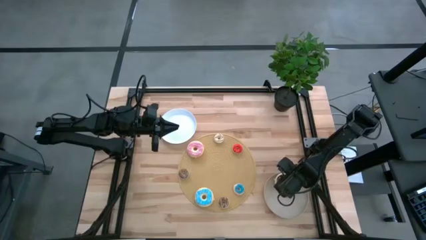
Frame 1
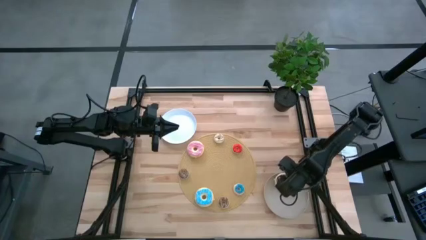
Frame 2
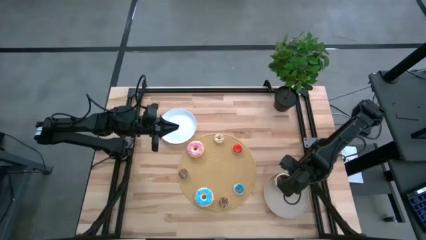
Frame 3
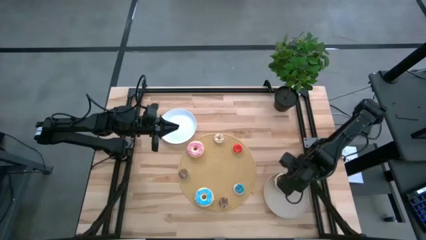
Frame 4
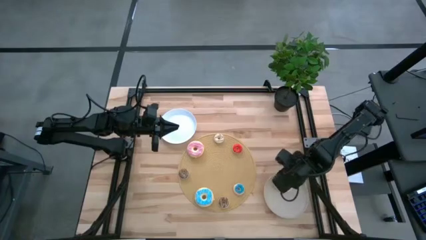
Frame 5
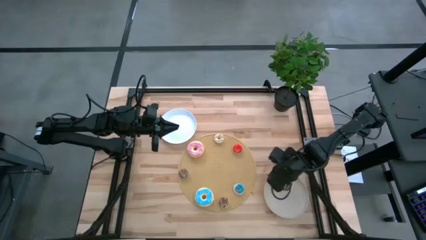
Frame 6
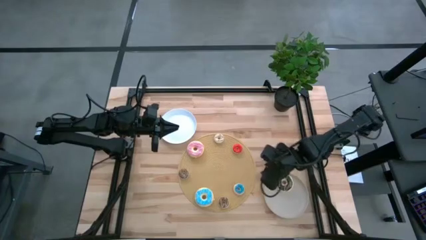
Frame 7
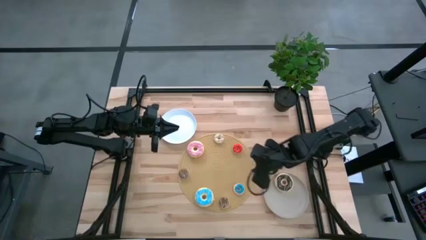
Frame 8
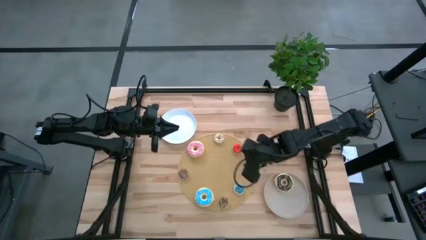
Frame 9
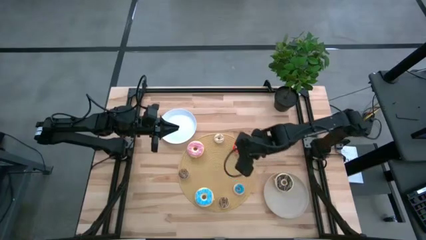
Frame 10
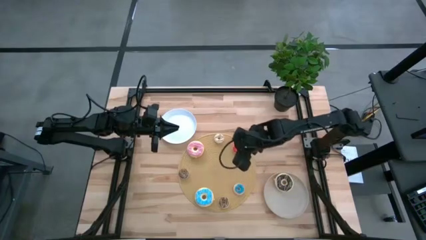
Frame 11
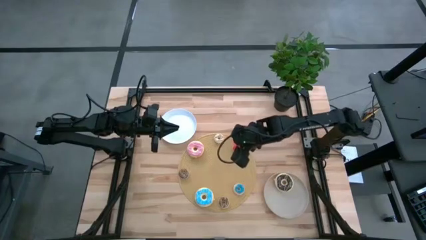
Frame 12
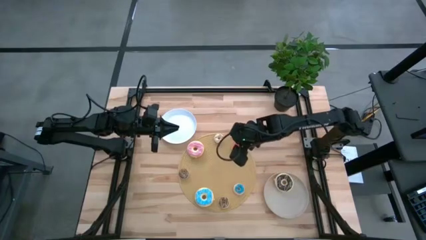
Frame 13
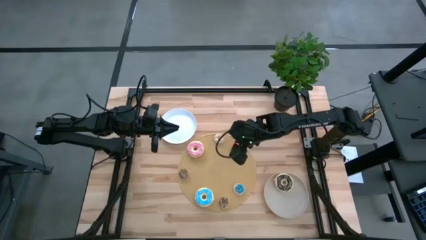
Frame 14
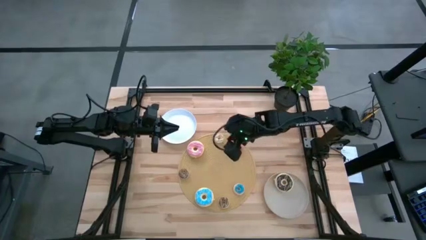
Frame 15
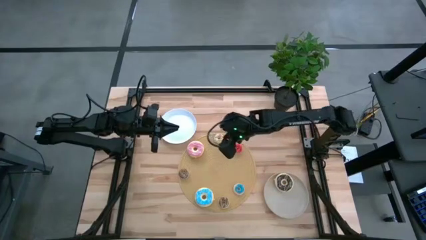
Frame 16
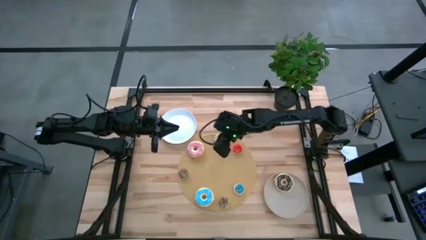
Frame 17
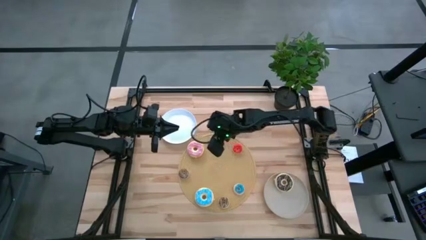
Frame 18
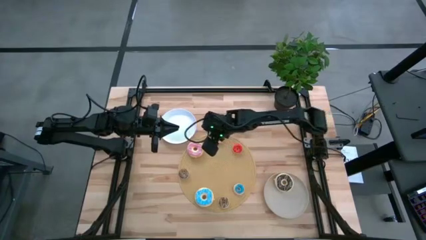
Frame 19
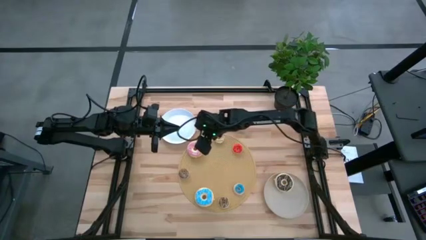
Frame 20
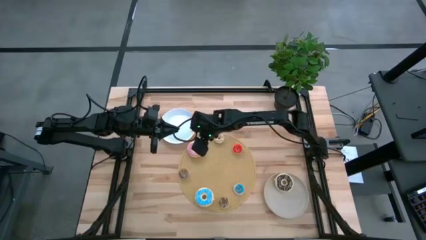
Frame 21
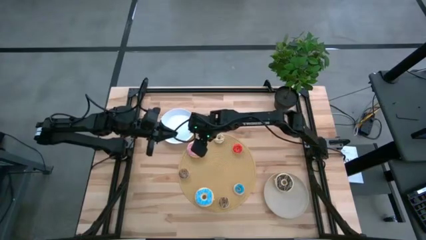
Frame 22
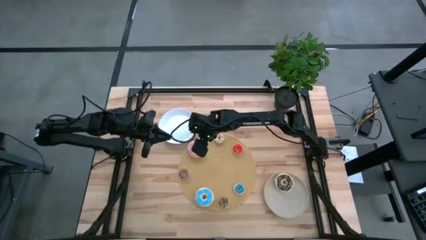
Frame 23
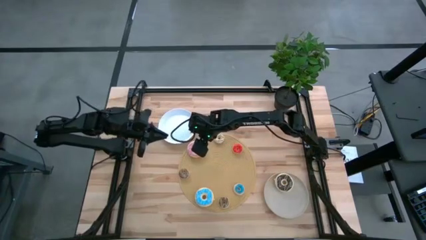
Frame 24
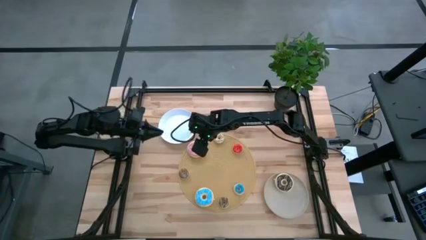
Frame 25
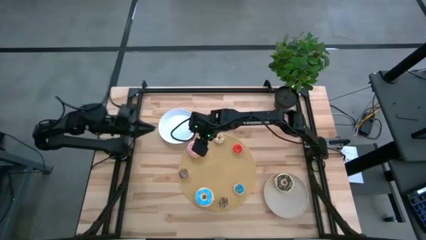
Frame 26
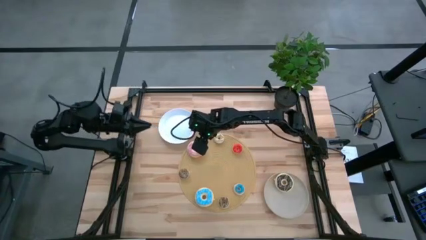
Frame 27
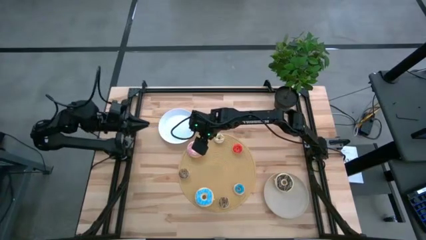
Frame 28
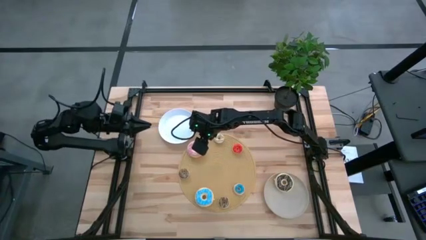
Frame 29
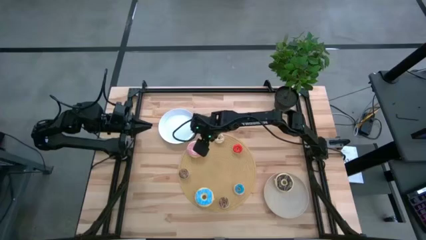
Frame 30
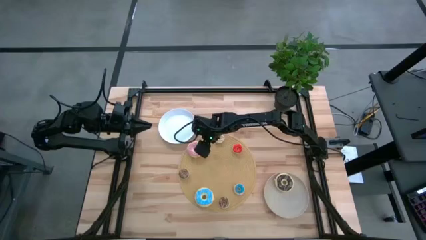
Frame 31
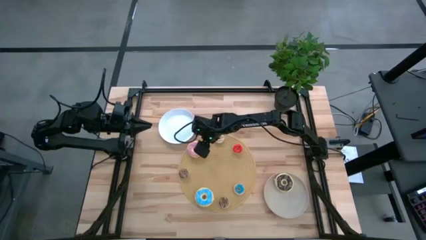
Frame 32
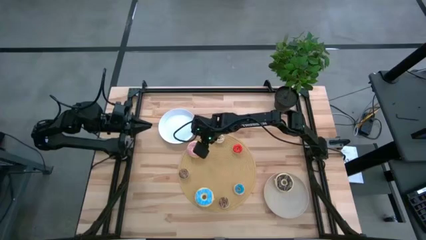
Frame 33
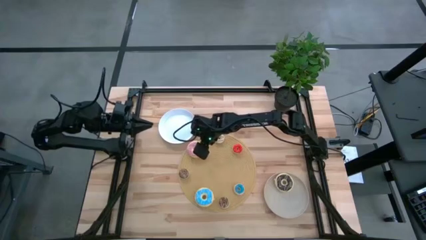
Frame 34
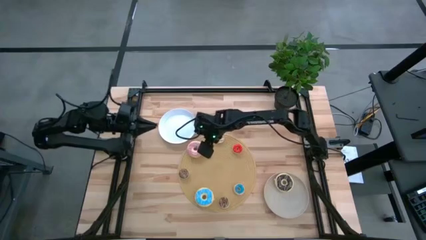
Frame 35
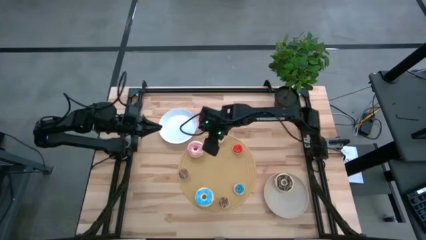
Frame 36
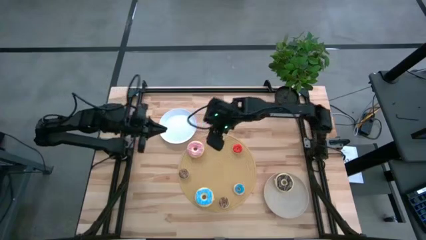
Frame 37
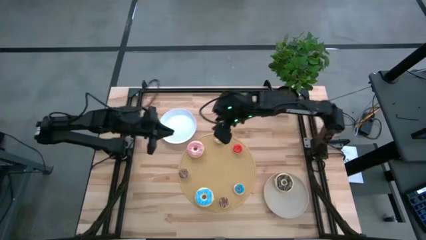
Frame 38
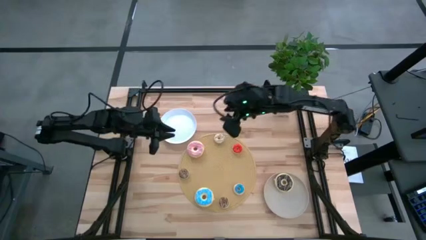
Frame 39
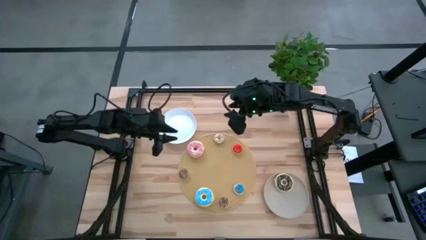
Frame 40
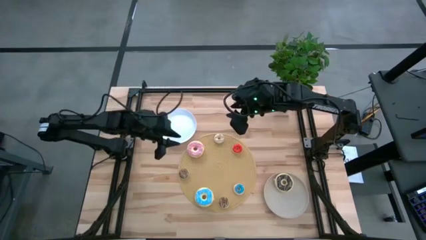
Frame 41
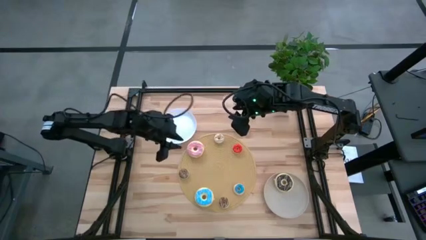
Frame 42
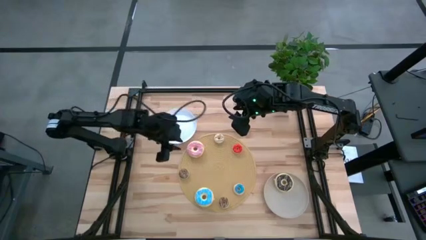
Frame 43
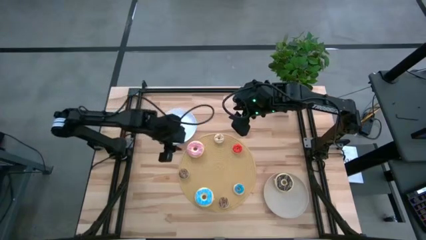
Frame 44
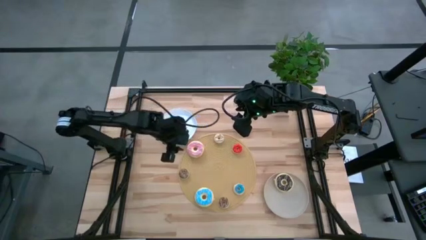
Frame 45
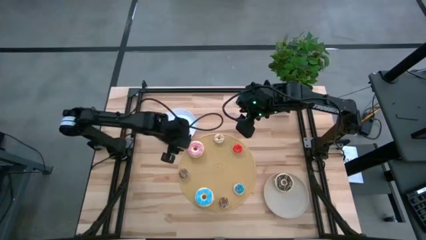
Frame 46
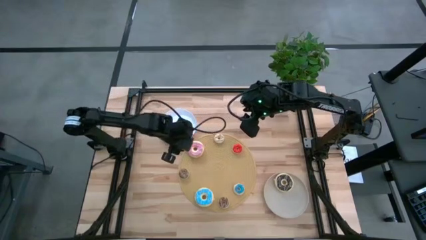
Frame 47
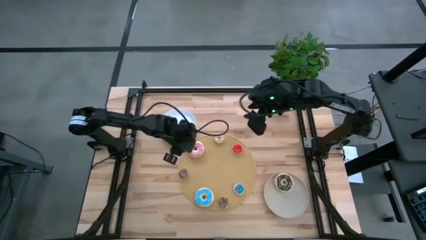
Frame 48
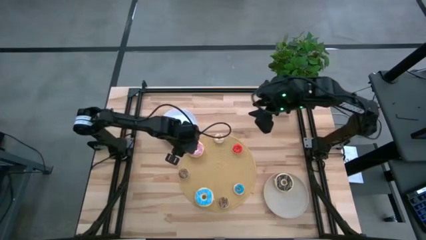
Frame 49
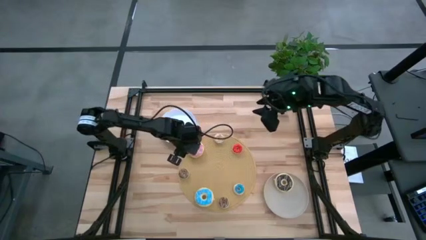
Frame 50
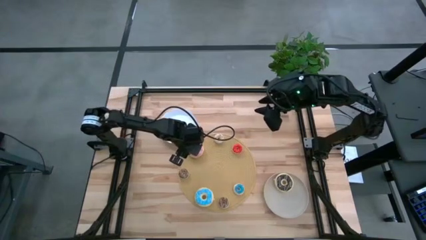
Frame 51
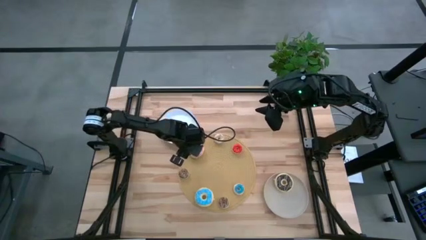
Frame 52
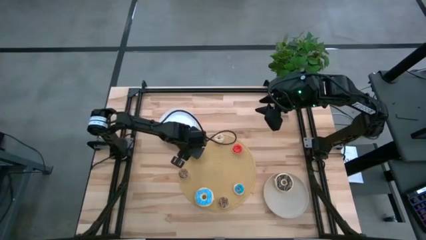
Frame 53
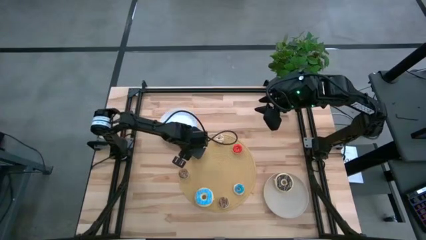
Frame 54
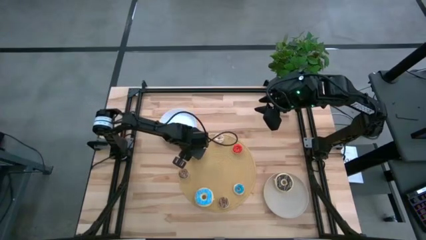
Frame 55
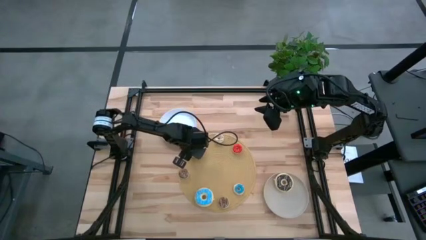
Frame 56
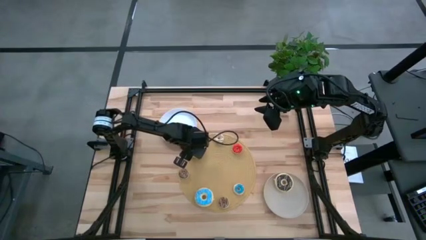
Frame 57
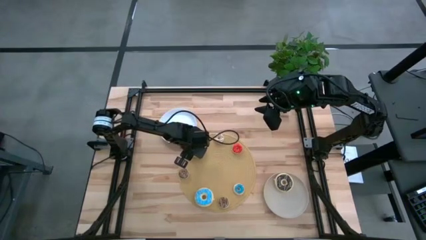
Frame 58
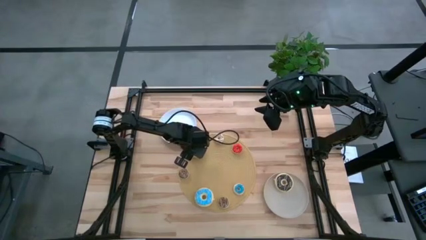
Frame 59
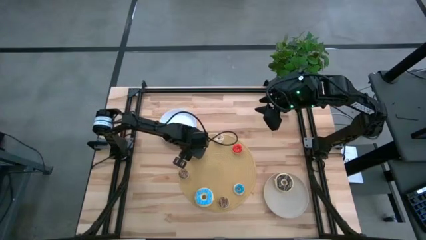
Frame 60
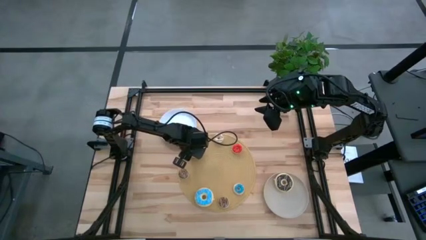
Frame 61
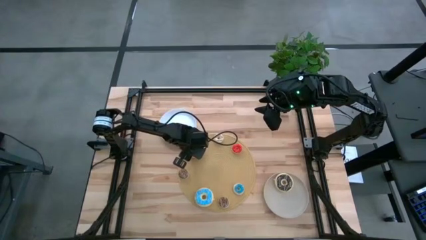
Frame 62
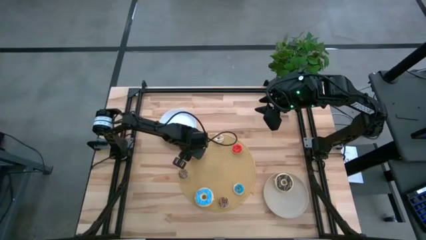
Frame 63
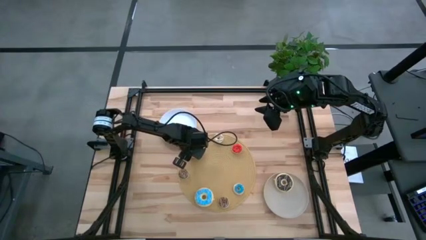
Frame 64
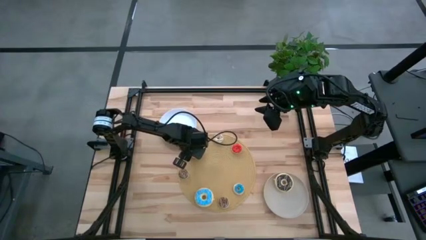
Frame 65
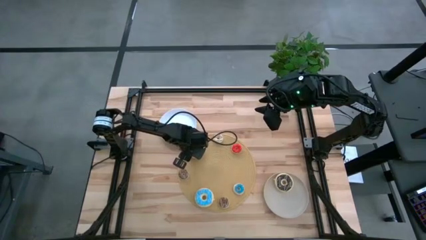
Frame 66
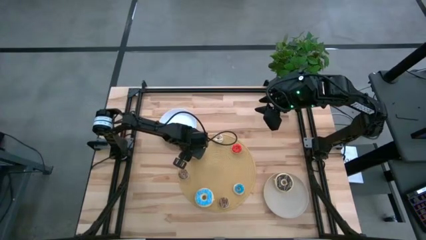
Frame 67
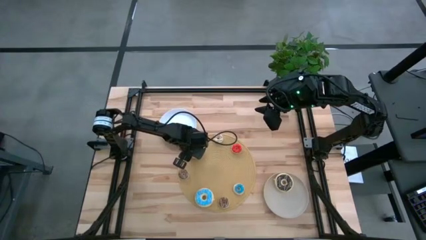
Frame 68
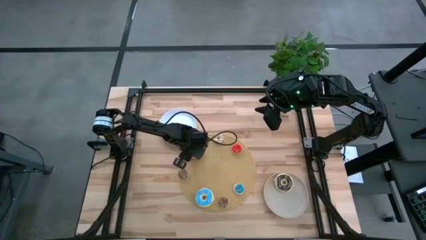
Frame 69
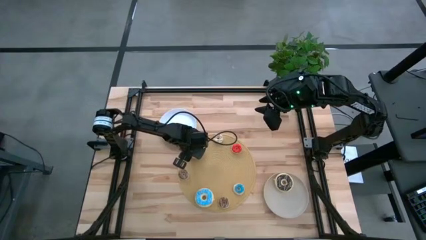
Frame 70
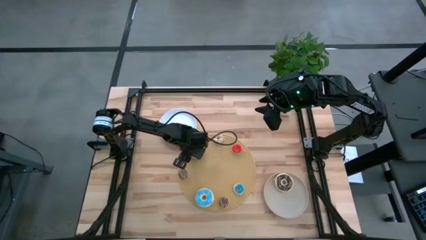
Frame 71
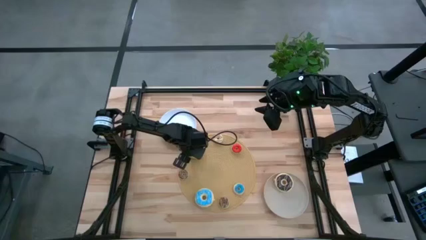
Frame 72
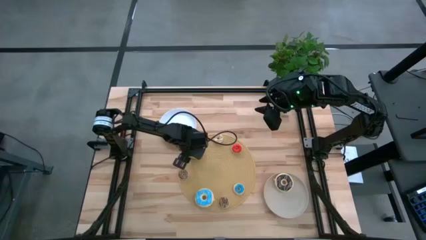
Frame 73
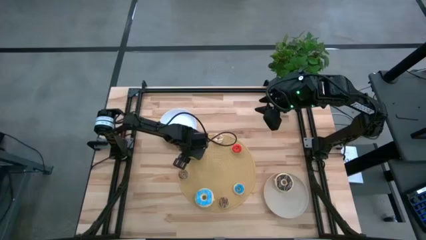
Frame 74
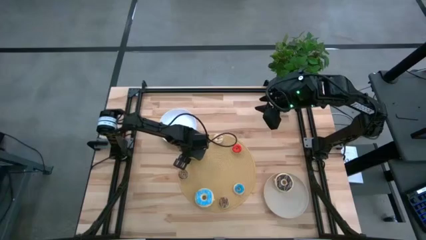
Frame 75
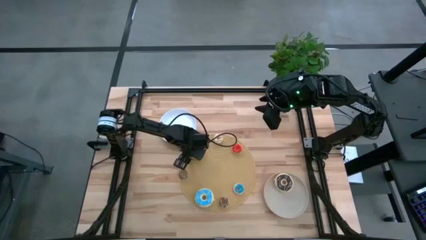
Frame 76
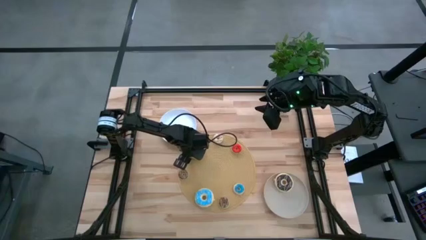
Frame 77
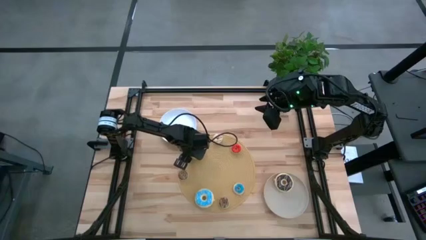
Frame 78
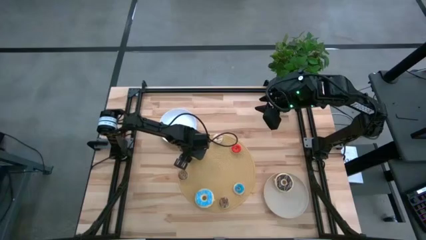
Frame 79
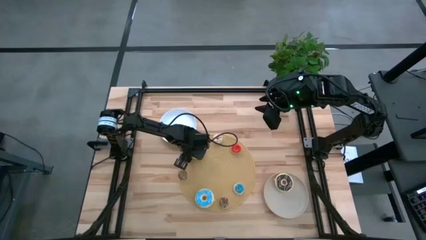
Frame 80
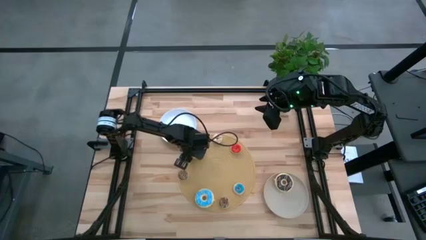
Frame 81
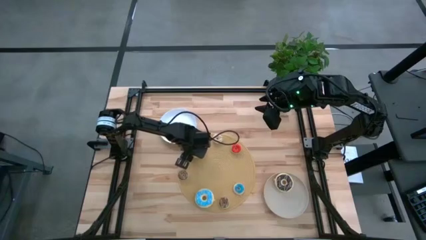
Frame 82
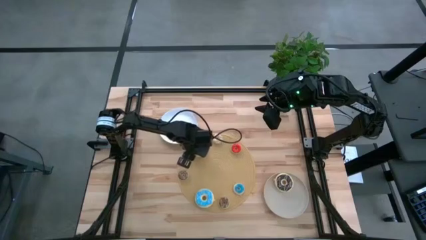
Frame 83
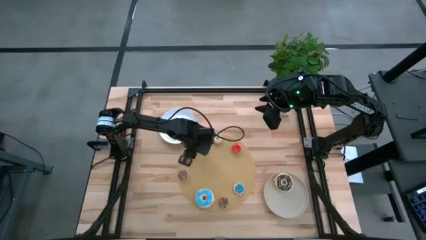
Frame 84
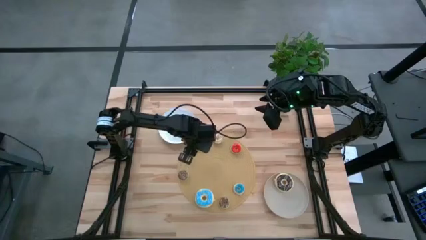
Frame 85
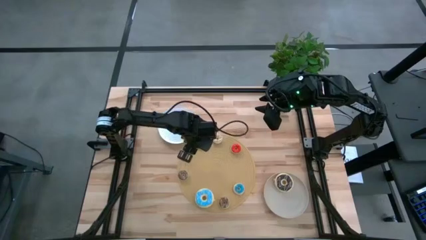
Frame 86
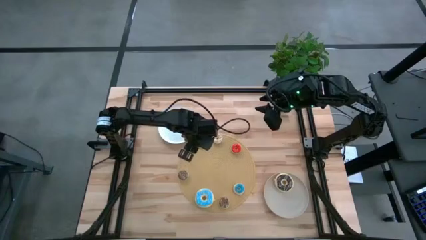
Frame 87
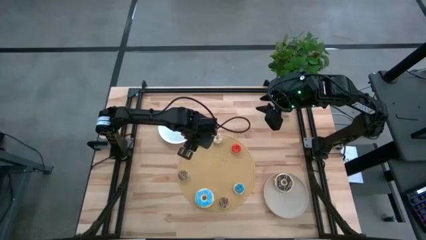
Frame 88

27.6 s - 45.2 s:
Task: Pick & Place donuts
Put the large pink donut into the gray plate
